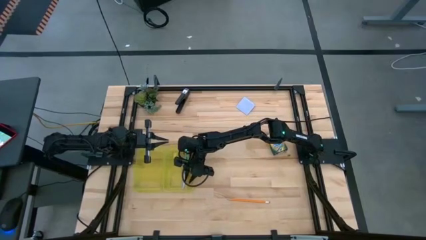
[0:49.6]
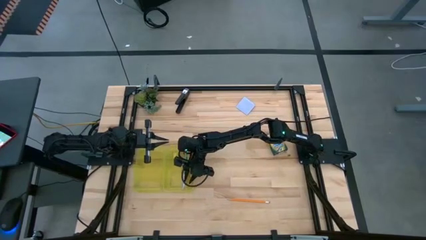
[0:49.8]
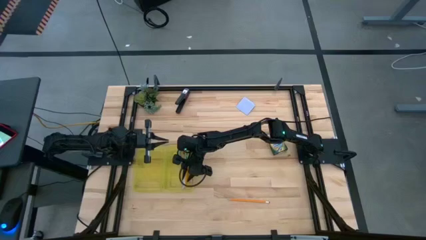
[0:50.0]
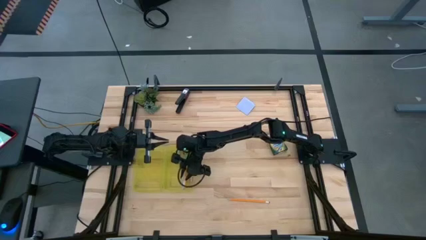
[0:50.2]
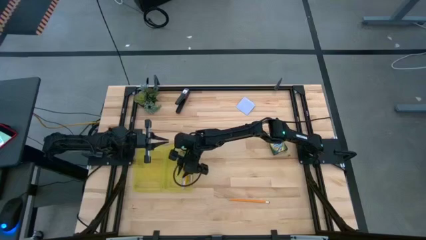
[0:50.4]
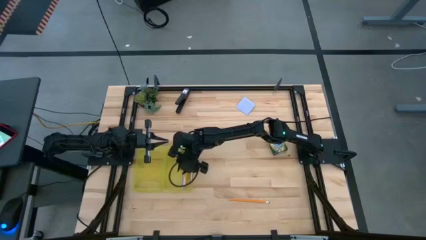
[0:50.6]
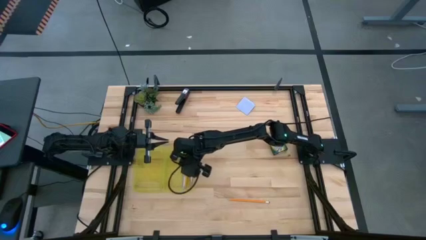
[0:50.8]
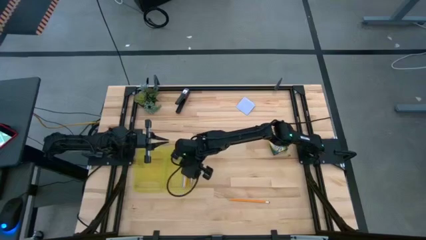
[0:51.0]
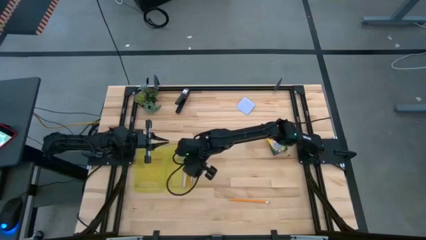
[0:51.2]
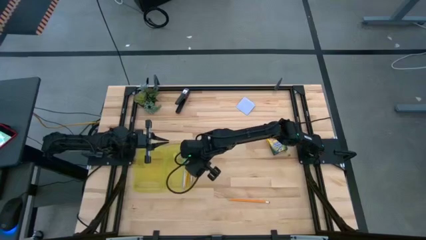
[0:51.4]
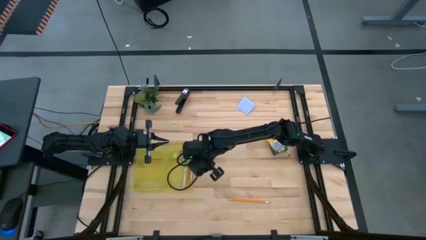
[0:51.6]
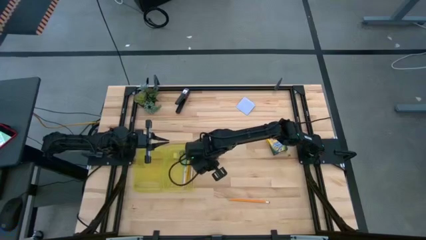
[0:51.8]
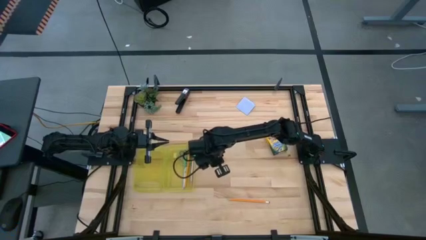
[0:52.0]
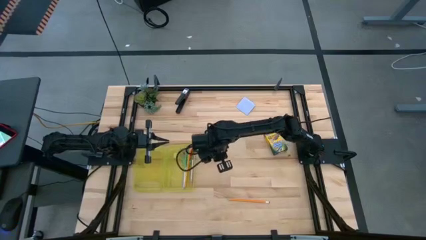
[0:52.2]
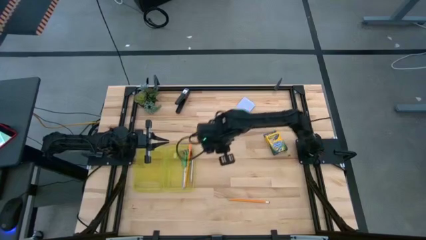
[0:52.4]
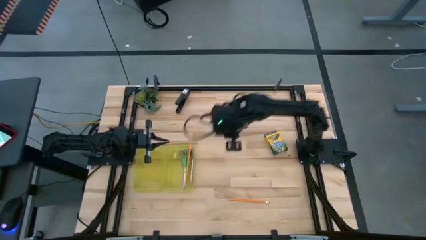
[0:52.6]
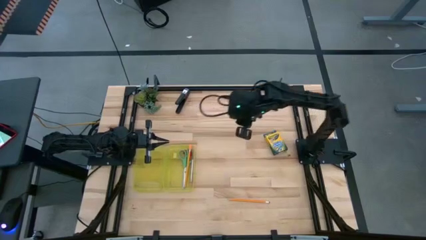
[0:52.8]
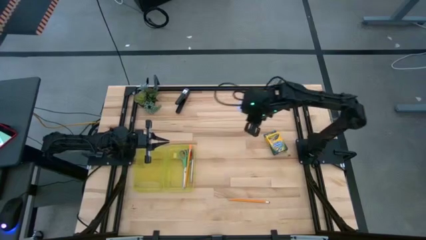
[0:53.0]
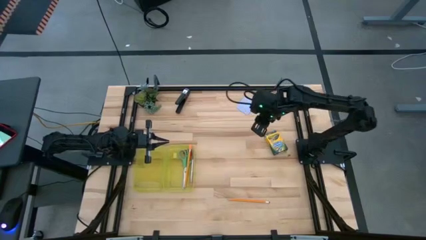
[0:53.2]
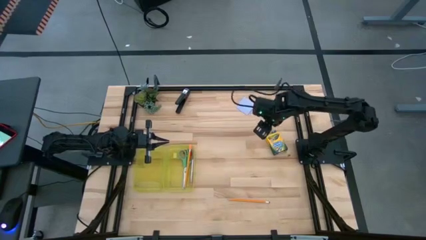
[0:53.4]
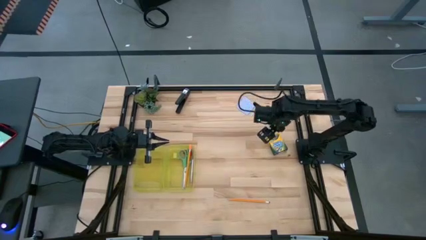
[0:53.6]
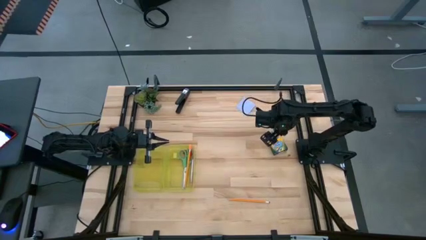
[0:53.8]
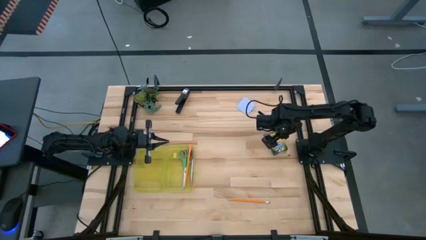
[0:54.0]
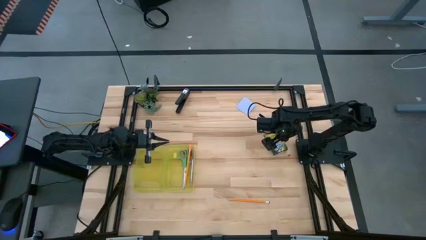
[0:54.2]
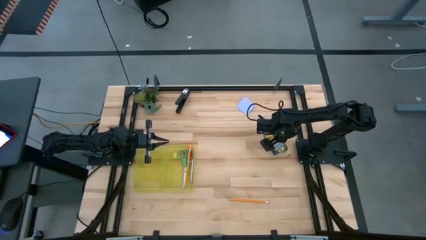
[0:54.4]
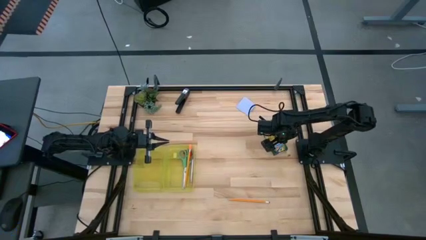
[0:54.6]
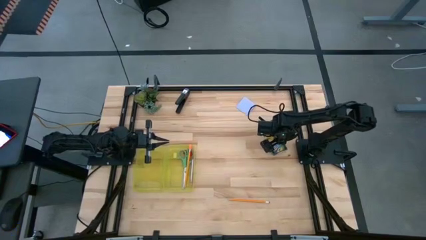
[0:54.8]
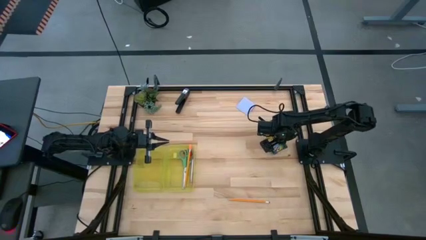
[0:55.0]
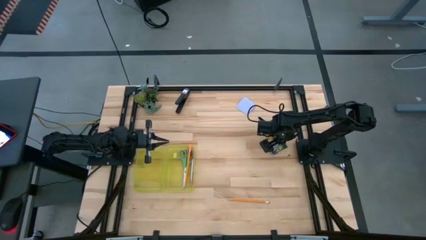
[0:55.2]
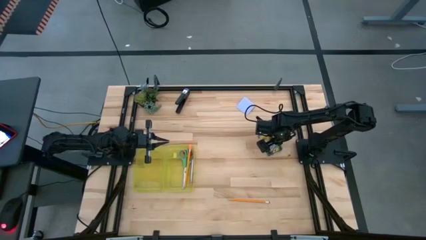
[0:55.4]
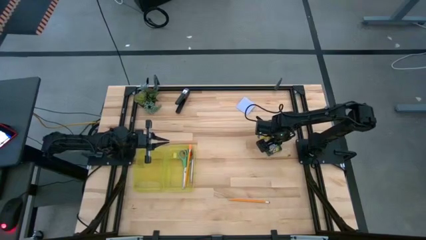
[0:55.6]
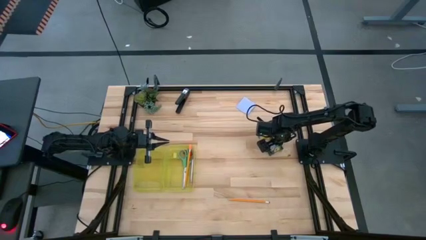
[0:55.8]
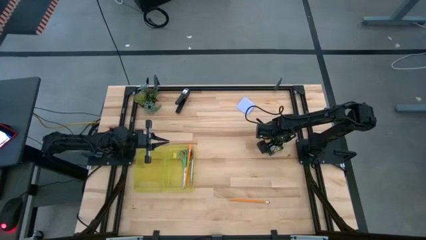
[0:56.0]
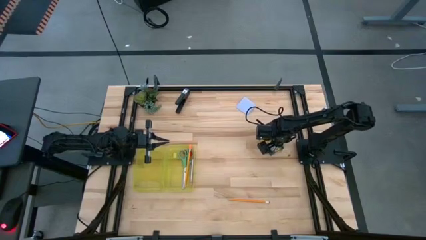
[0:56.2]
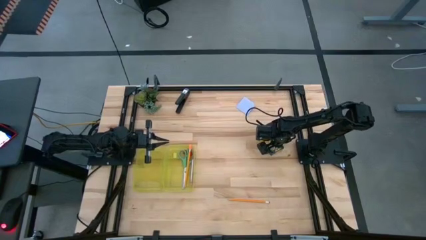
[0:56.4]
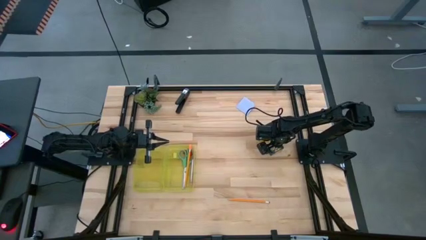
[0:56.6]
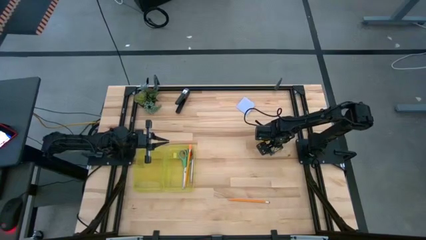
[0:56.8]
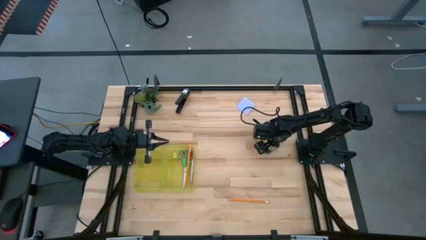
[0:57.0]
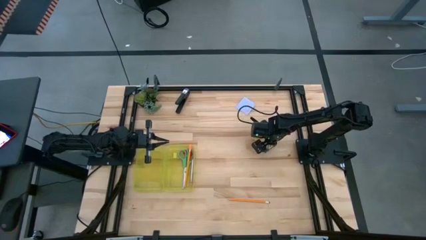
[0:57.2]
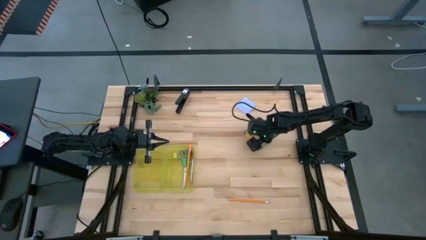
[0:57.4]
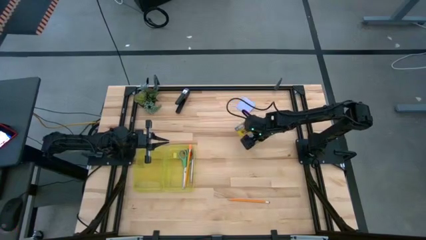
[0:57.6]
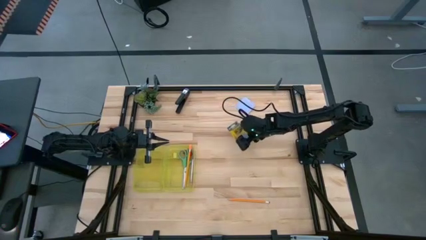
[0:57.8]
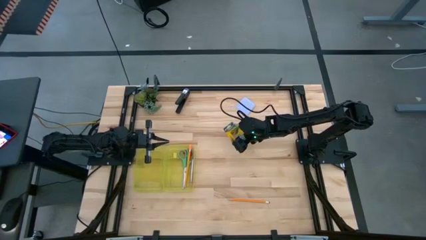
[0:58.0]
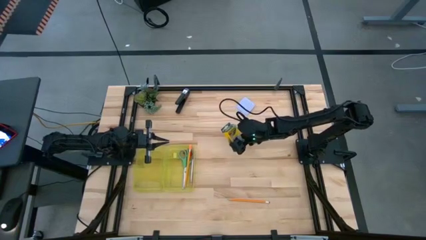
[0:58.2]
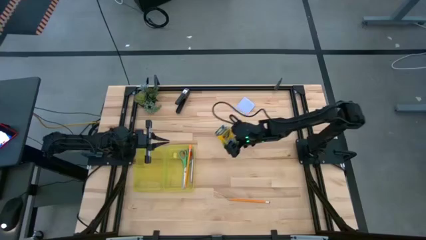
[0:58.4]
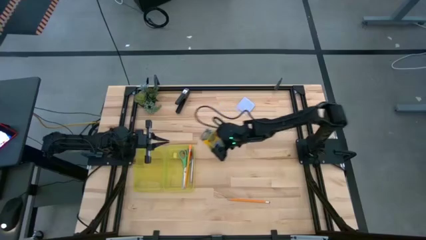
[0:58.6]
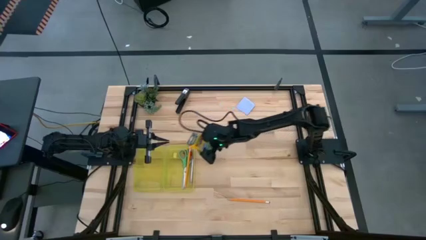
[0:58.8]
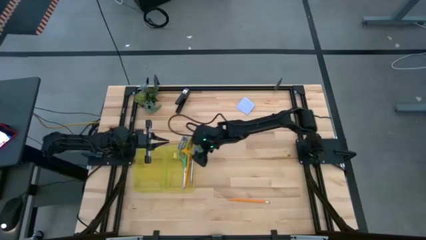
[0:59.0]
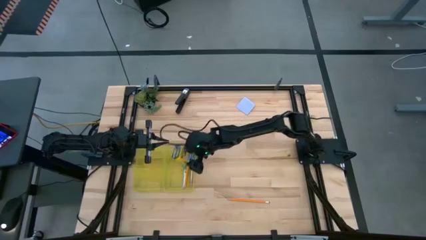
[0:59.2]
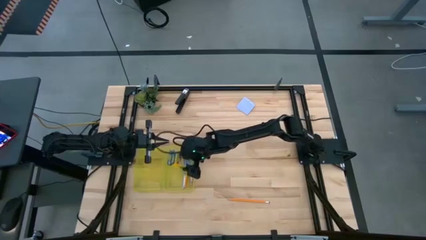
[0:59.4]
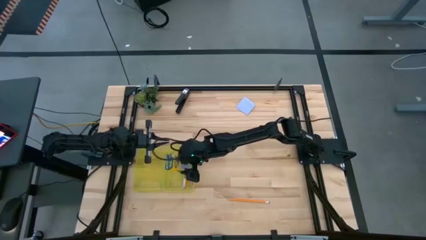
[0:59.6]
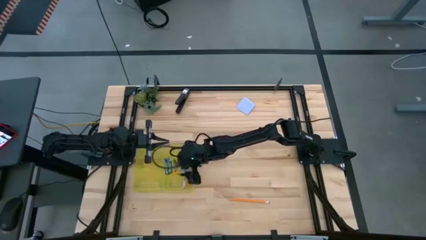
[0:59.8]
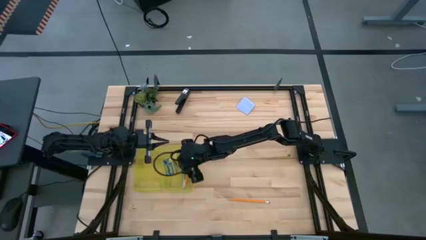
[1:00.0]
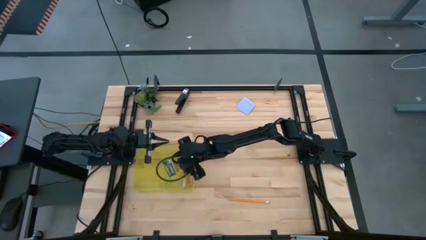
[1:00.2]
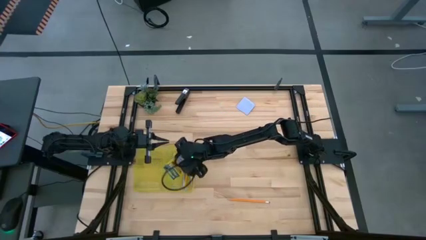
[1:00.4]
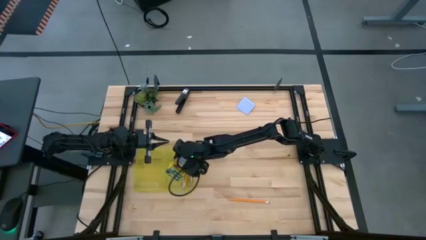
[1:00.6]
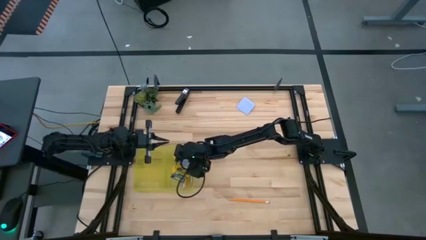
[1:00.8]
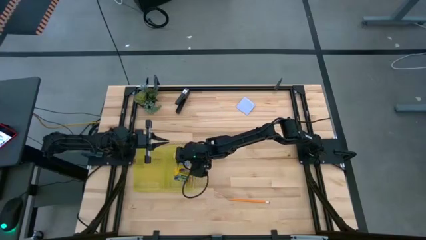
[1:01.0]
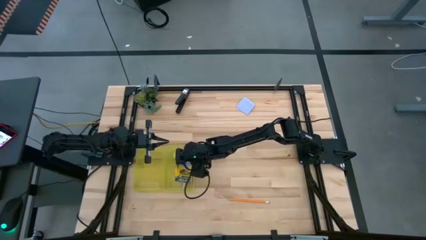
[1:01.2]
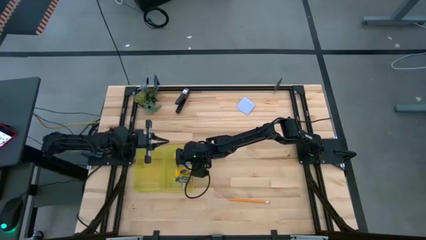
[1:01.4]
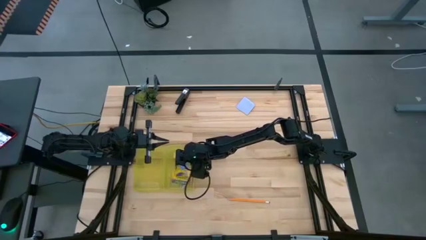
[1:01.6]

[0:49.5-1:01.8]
Task: Pack school essentials
Put the yellow crayon box into the yellow pencil box

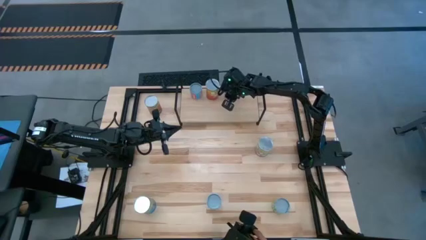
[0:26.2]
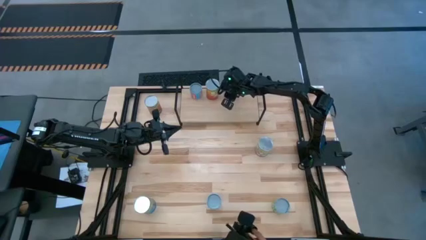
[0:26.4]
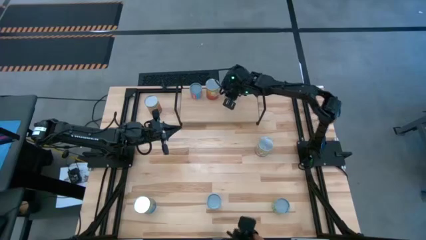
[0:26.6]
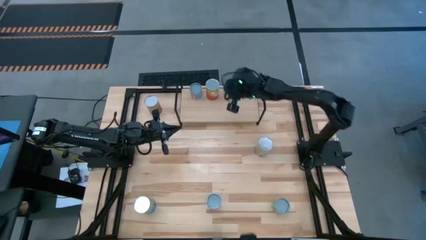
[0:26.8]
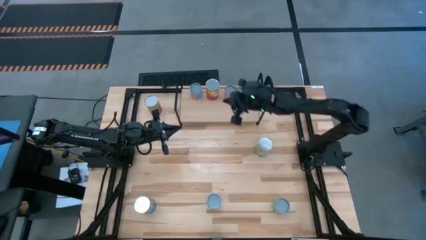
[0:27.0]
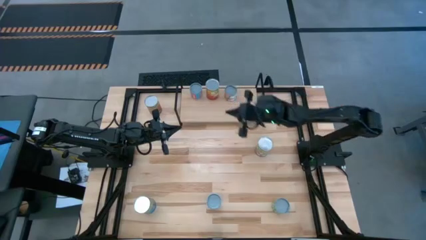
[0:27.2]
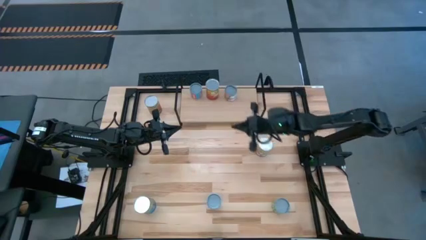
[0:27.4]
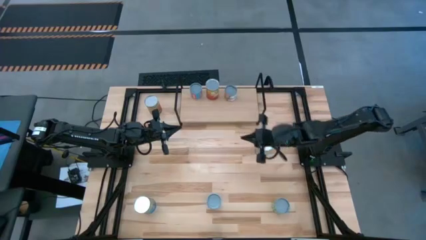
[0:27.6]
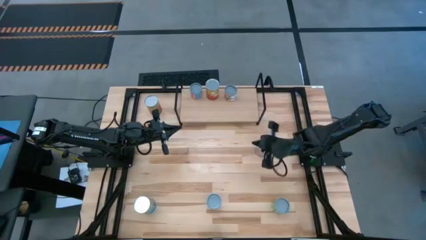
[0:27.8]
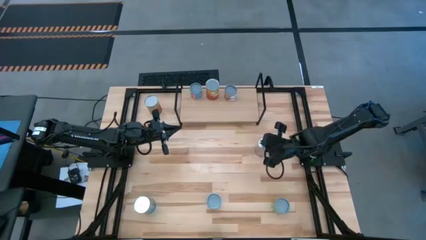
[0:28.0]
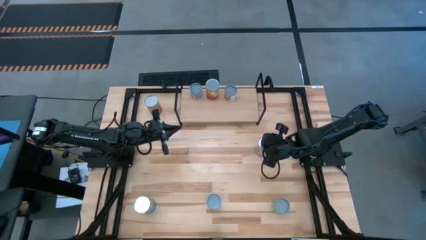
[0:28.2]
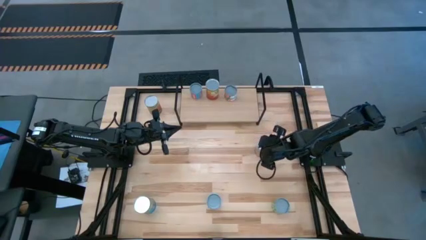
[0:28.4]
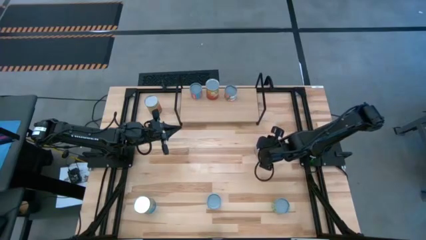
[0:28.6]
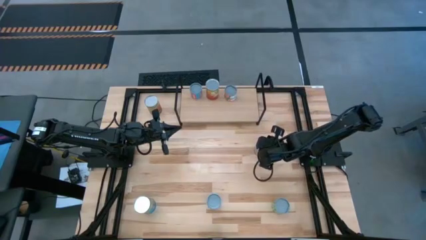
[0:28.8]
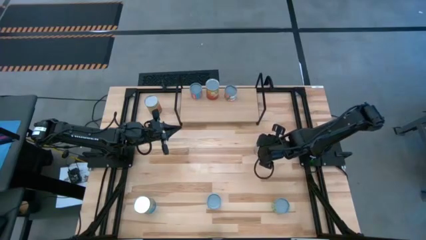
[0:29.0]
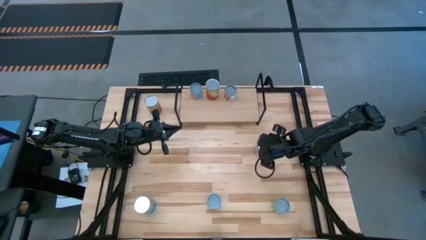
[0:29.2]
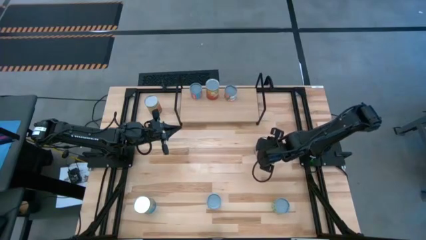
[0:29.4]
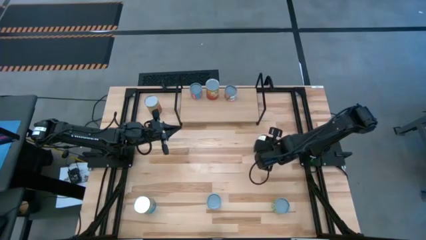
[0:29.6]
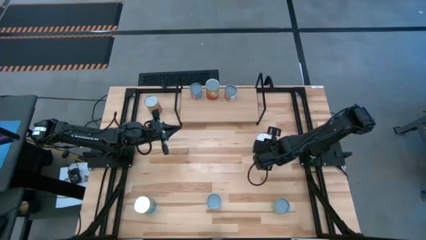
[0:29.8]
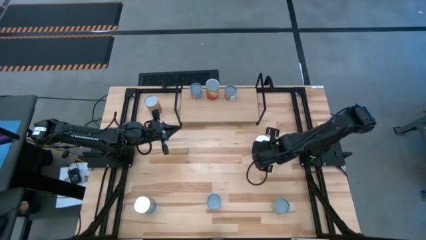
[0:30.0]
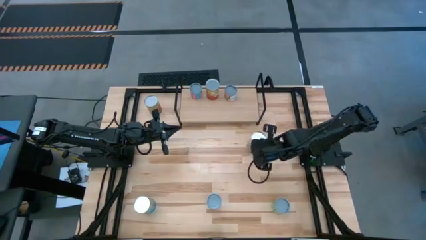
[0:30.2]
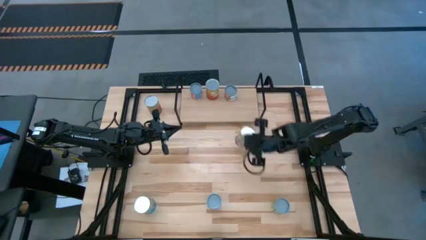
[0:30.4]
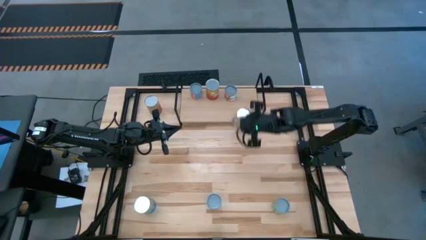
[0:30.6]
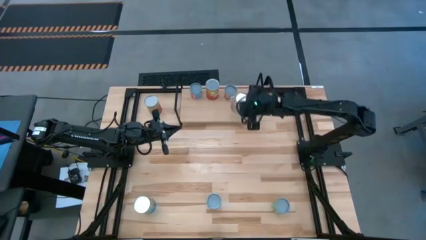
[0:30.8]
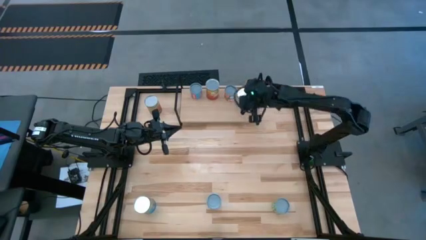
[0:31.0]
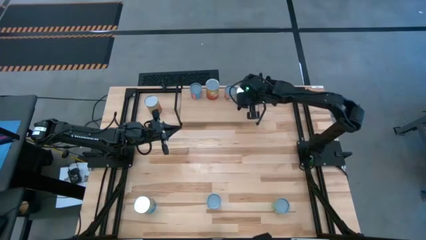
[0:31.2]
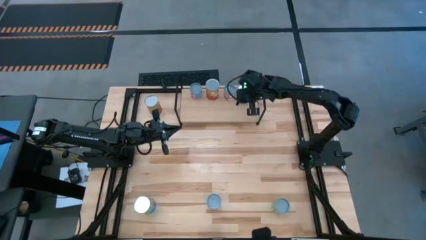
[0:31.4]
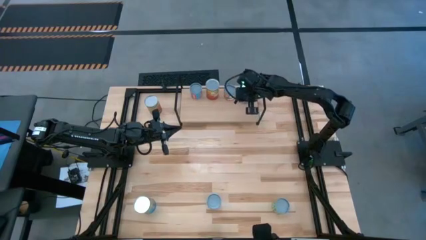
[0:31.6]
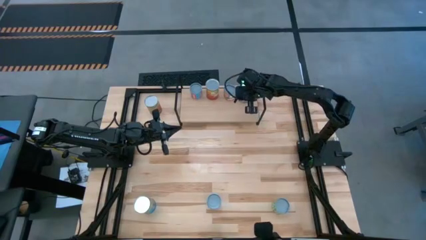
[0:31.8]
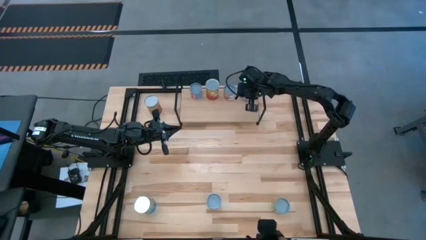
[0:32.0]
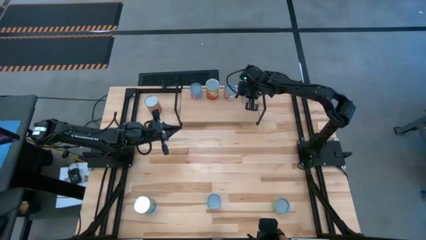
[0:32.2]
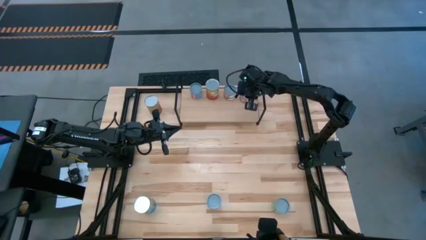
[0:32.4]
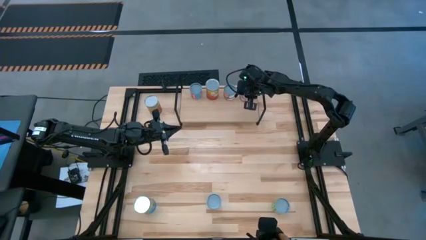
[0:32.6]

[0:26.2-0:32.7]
Task: Pick and place cans onto a shelf
Put the right light blue can on the shelf
